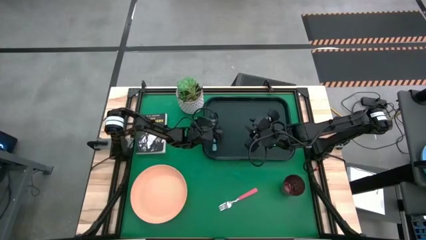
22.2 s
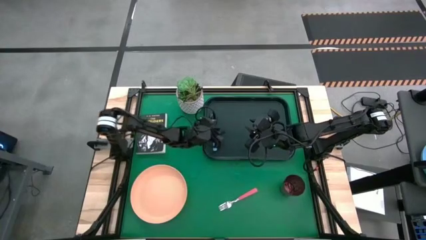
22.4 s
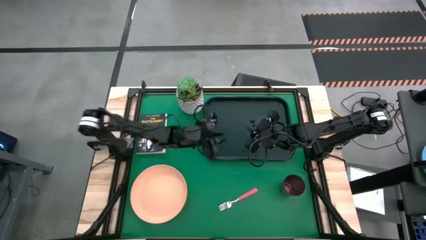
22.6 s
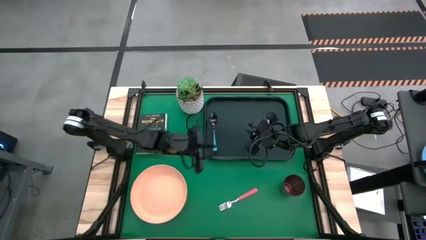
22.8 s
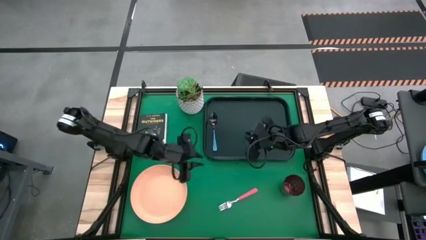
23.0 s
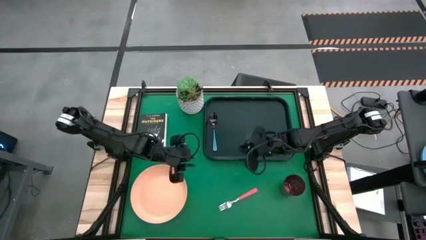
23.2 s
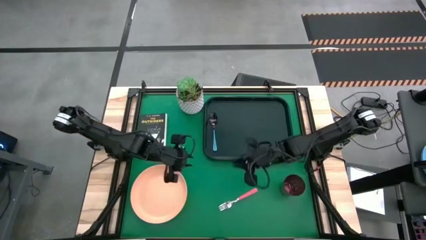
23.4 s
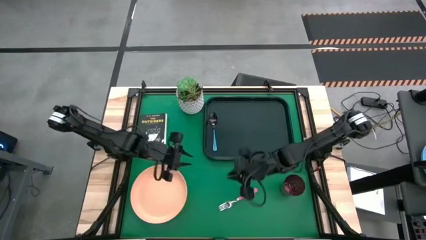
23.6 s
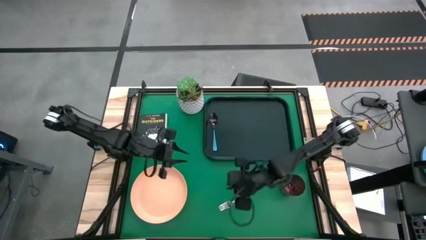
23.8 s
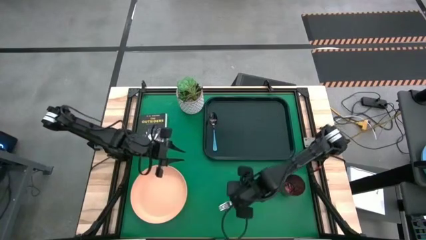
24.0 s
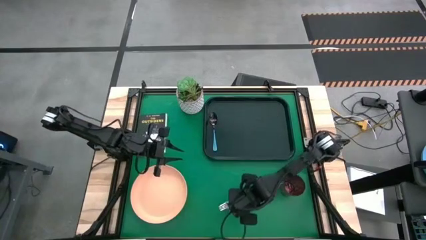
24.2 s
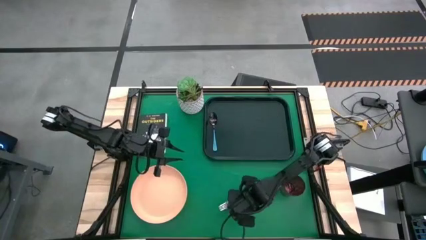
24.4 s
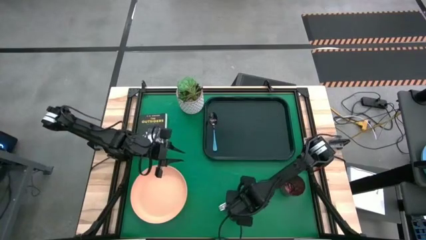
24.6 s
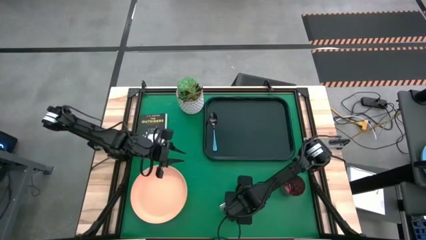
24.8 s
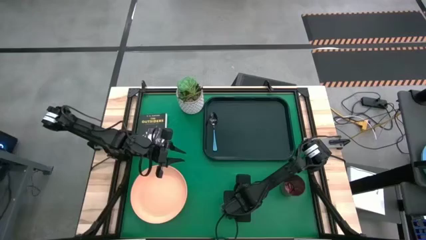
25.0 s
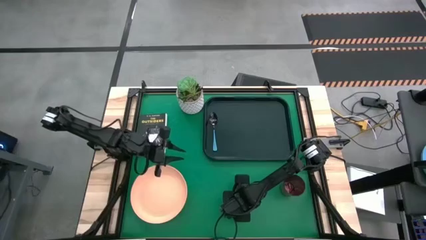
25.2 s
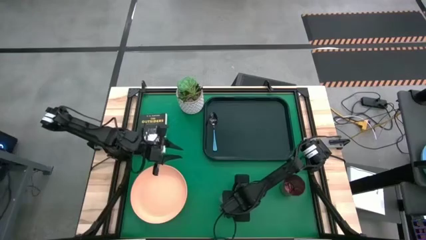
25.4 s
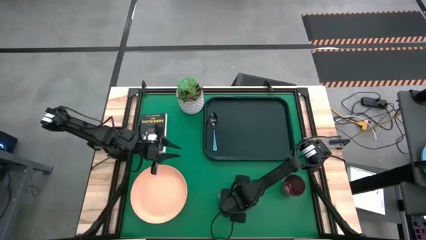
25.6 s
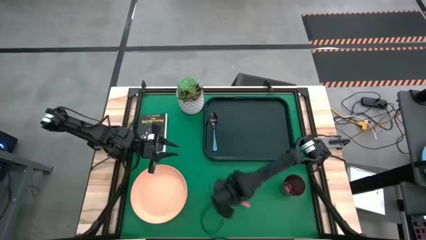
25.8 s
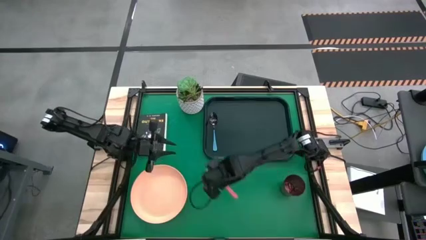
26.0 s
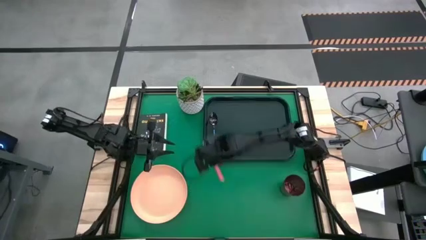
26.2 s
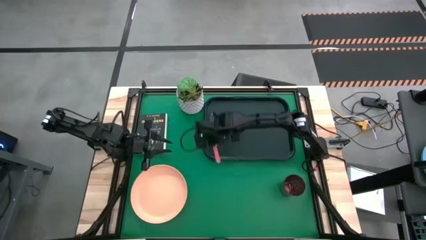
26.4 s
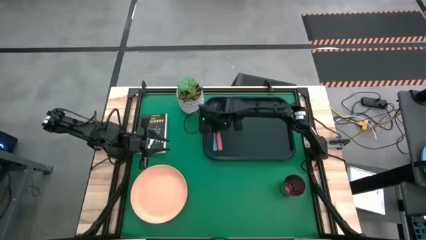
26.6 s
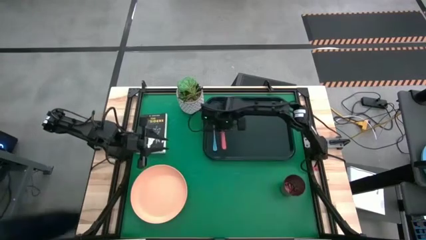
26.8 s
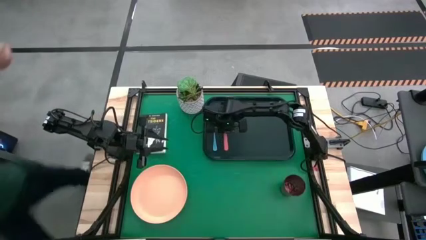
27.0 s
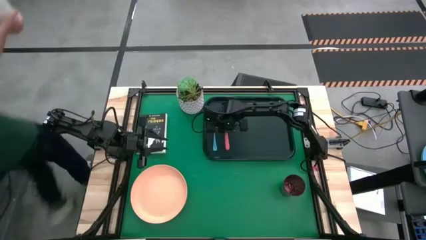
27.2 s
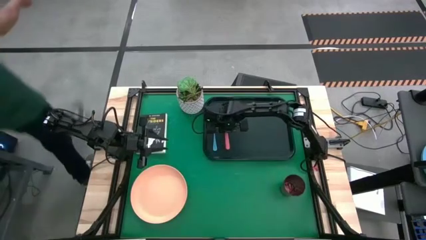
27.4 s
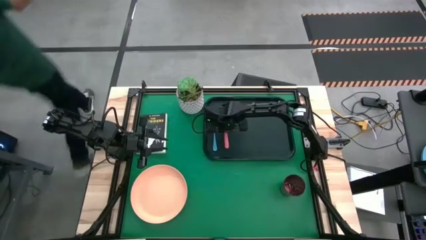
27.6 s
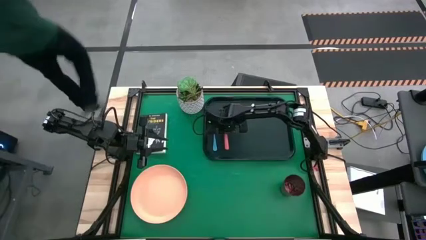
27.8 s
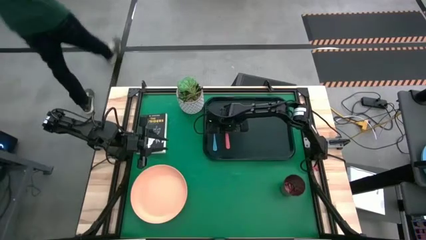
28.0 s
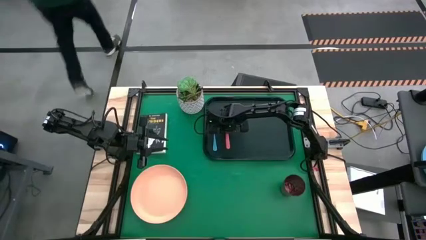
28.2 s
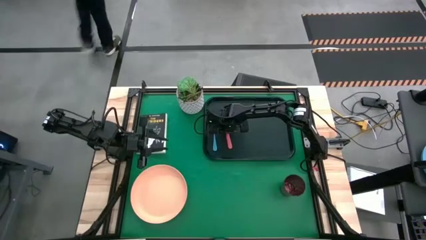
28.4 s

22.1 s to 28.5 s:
Task: Pick and place plate/cup/fork/spoon on tray
Put the pink fork on the black tray to the right of the blue spoon

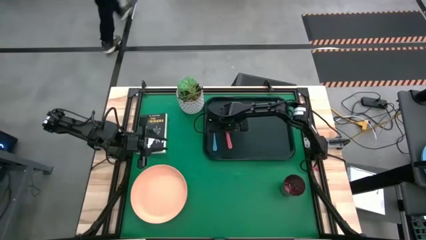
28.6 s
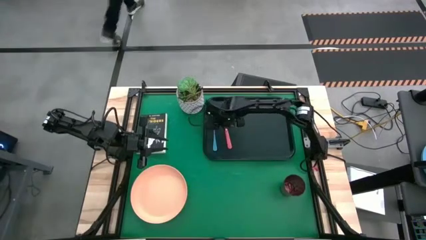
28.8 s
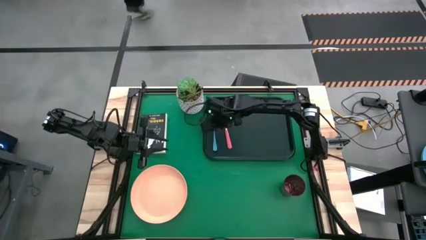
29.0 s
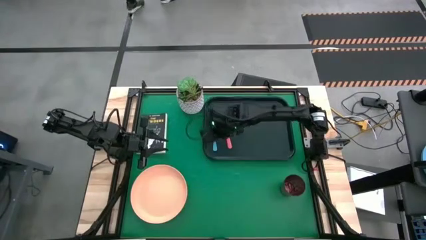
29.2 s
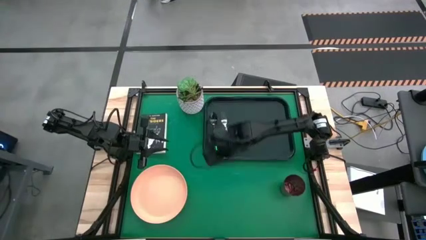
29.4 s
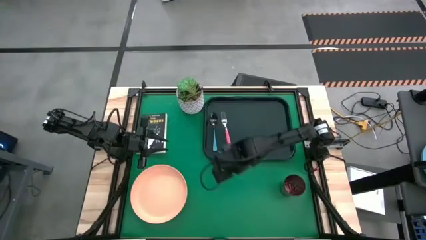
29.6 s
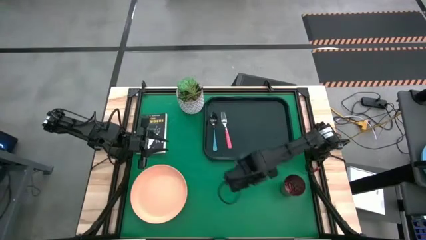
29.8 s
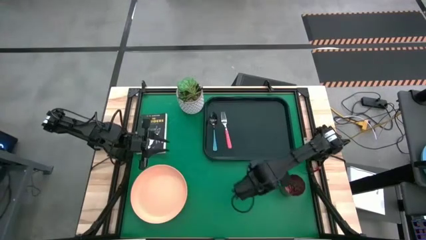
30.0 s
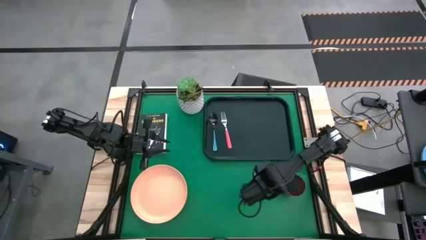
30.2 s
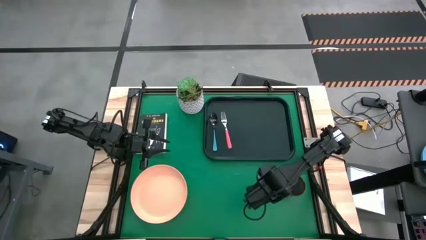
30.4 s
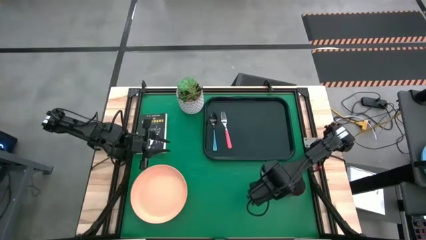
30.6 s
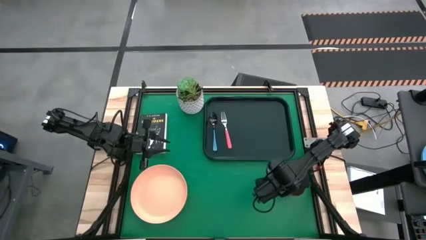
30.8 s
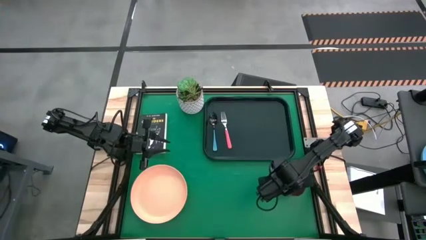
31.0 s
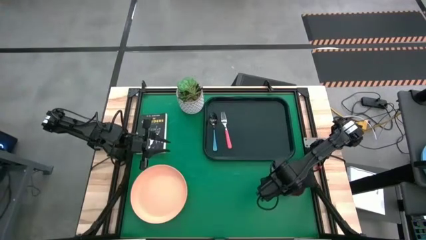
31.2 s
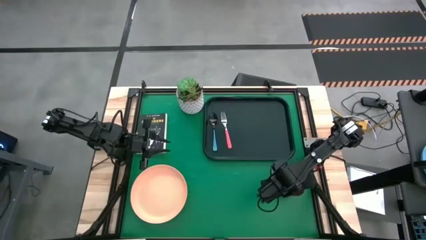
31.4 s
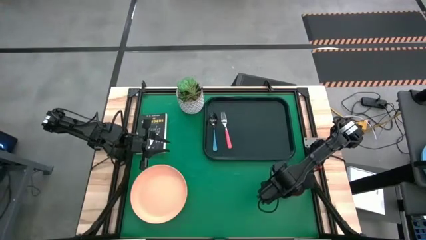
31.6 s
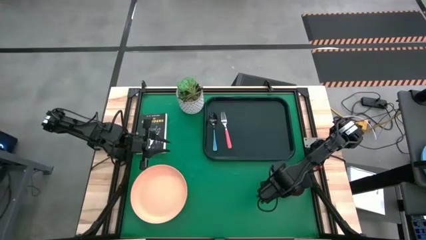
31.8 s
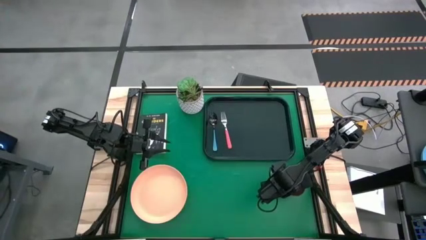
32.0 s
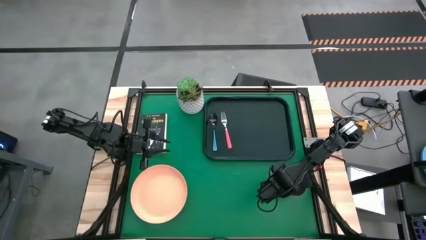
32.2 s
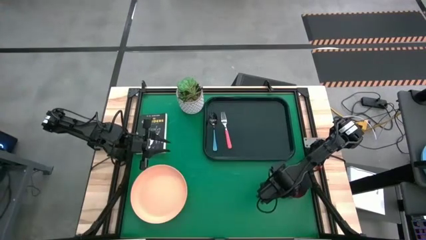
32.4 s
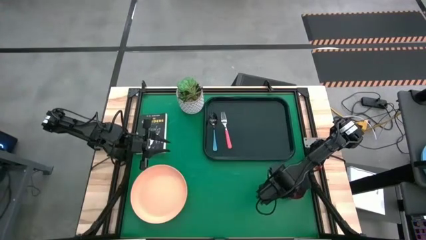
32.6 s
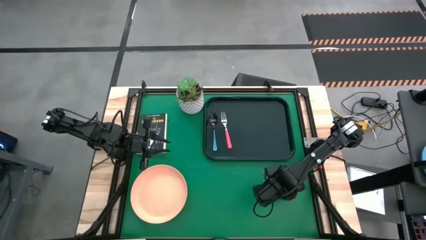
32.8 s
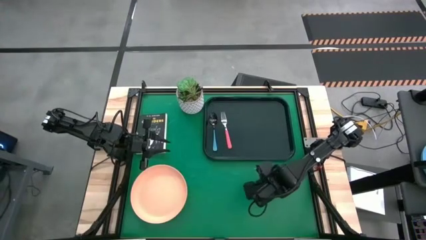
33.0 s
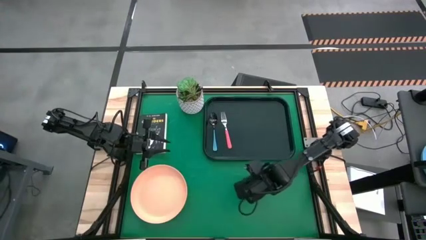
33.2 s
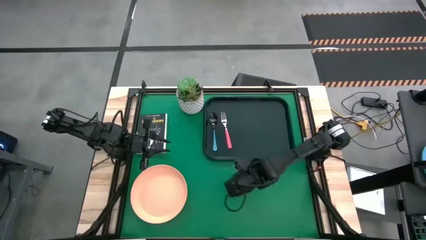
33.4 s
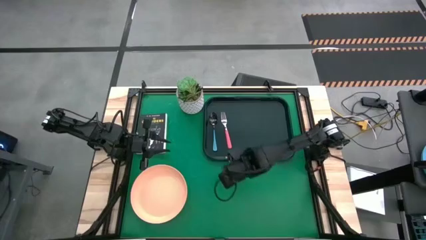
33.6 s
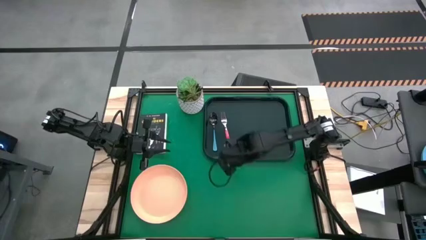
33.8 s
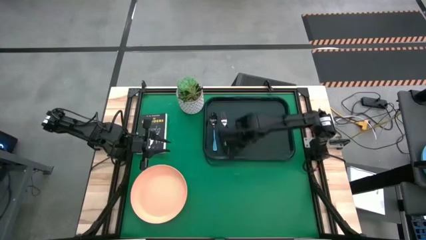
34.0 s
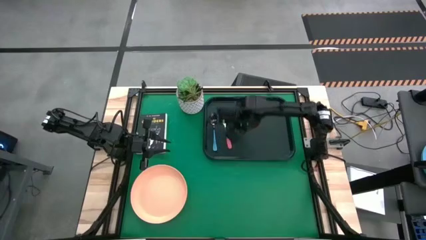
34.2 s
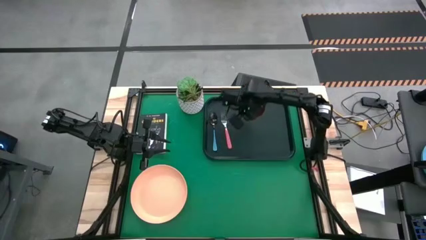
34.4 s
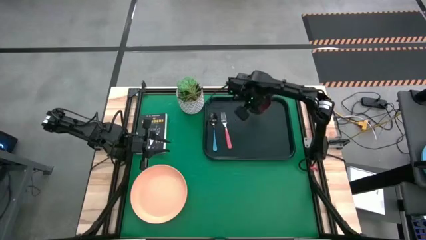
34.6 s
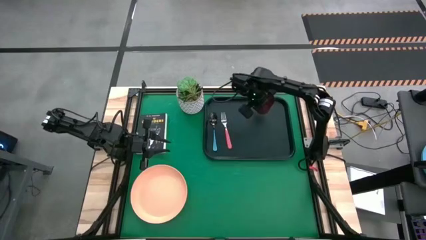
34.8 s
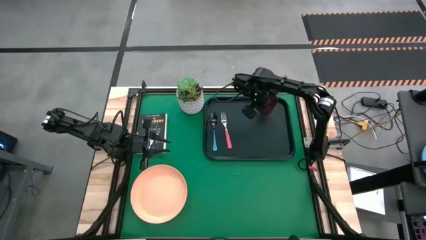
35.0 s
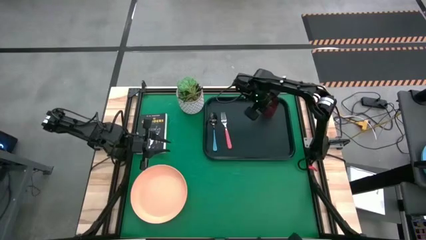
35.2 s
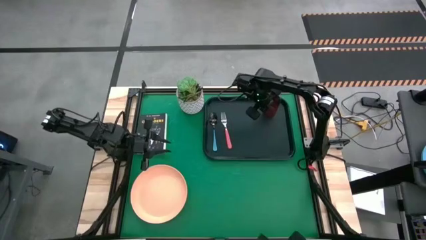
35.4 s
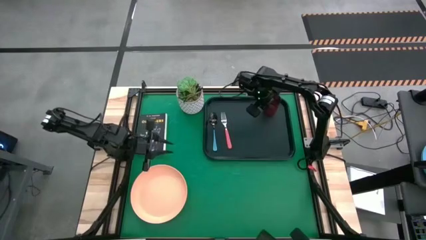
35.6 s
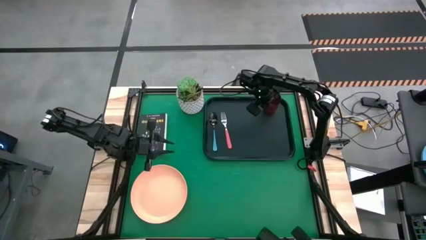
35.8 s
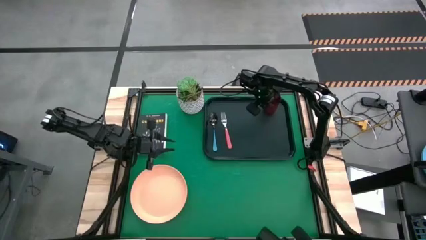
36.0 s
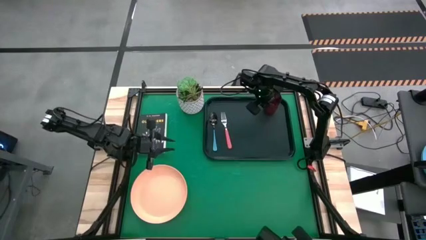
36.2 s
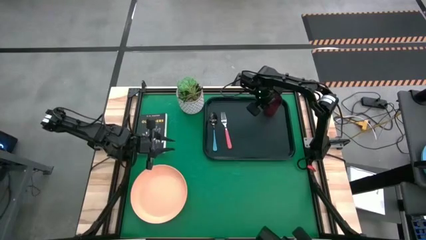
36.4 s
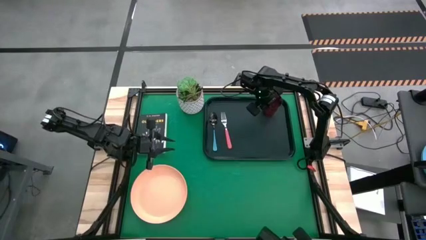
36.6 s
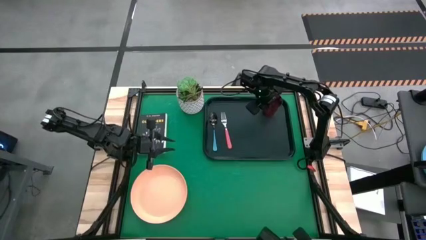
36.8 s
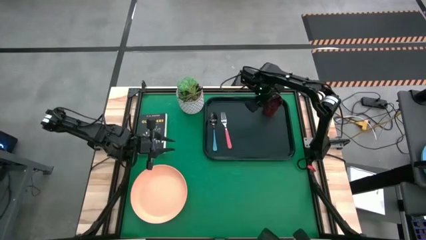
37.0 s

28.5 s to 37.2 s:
Put the red cup on the black tray
